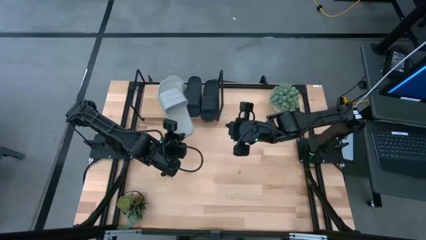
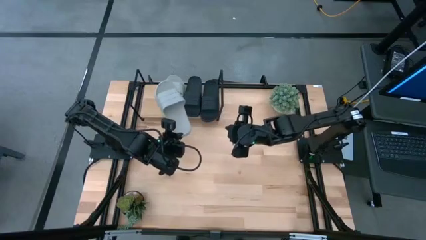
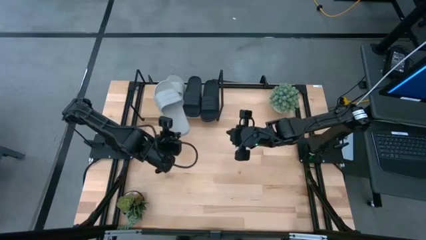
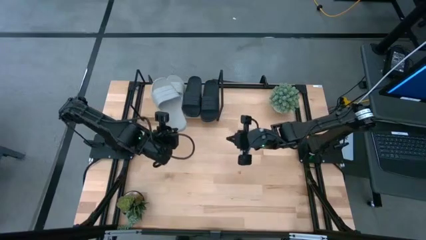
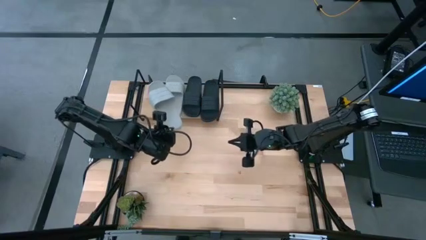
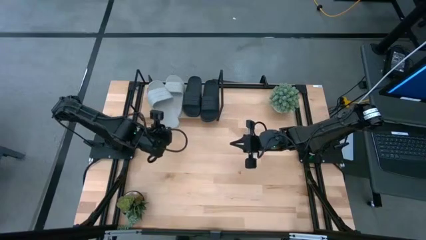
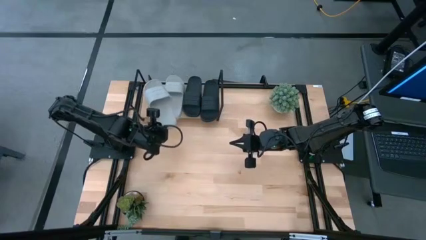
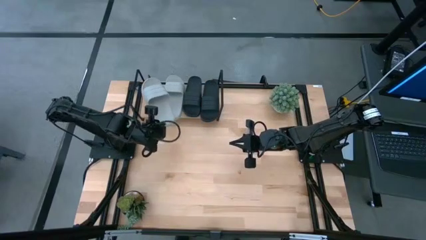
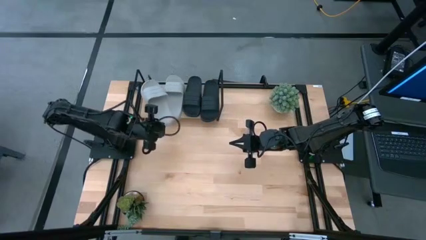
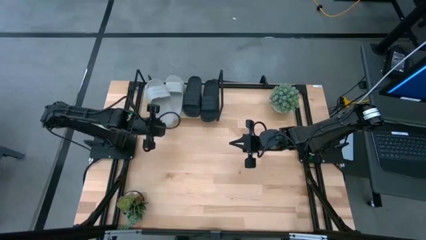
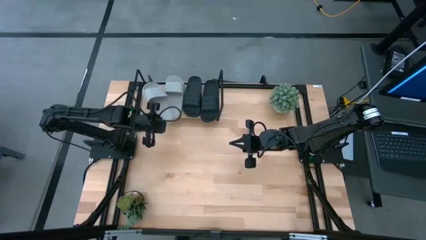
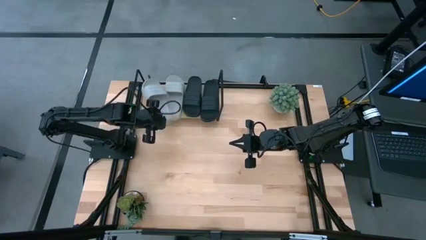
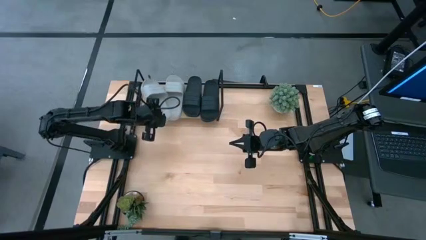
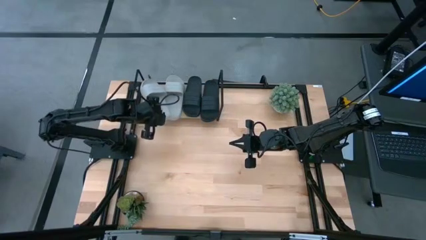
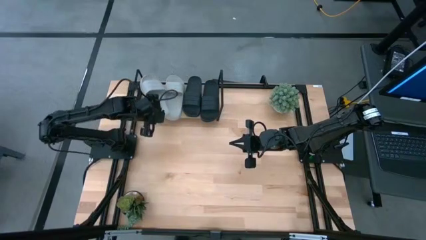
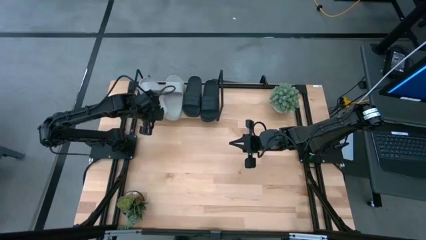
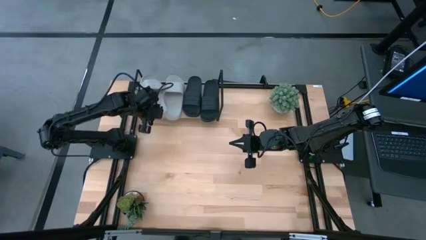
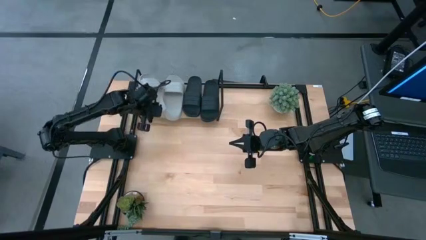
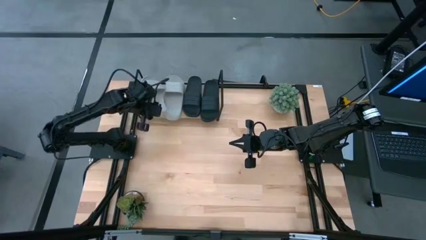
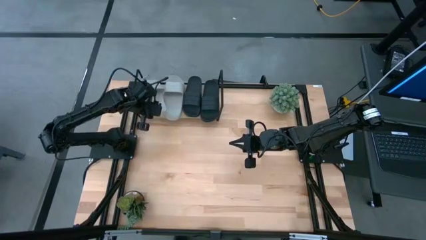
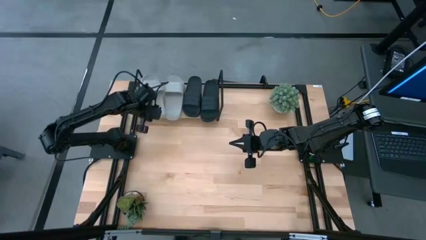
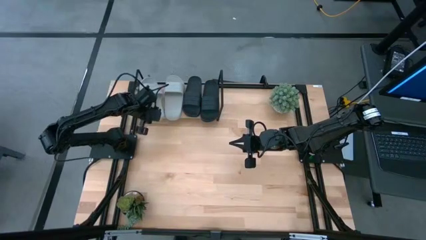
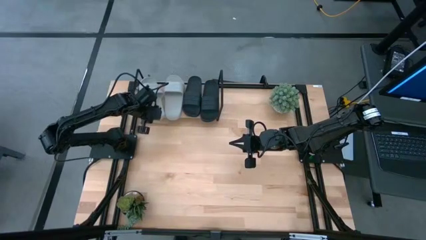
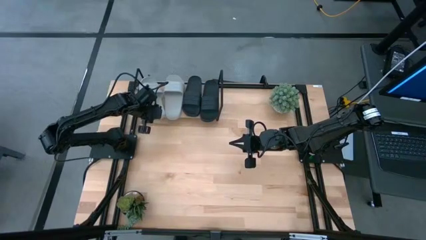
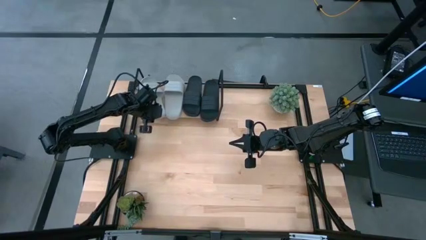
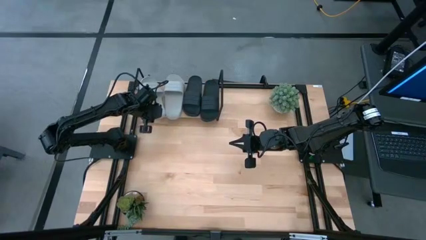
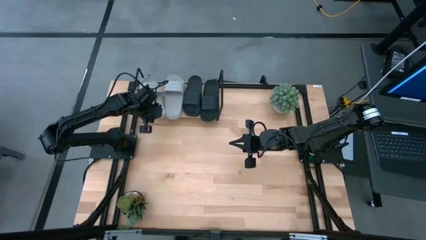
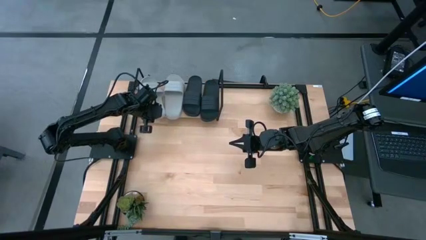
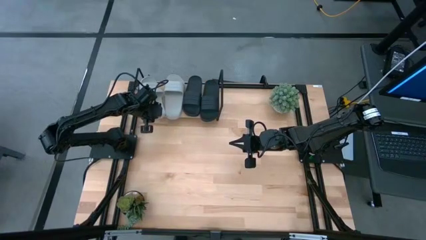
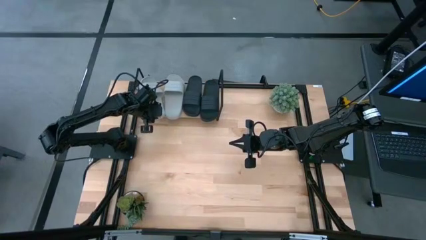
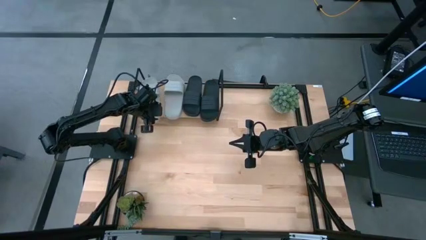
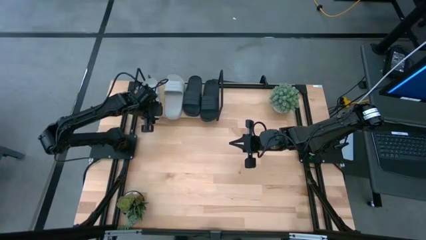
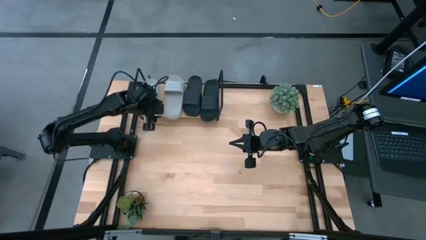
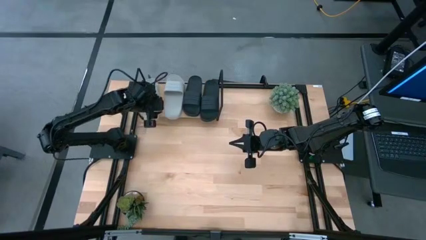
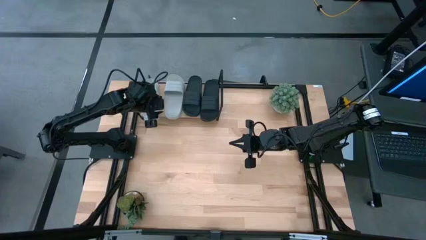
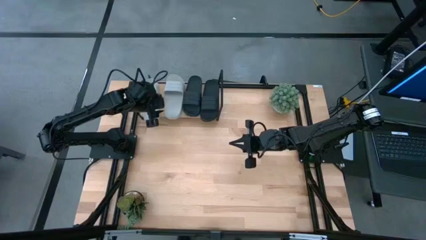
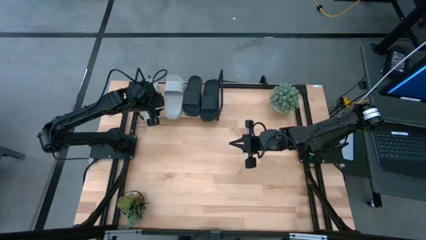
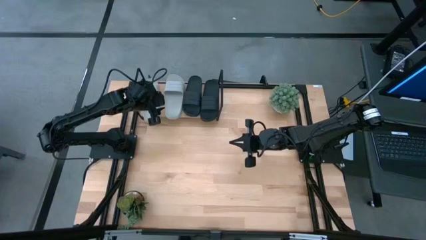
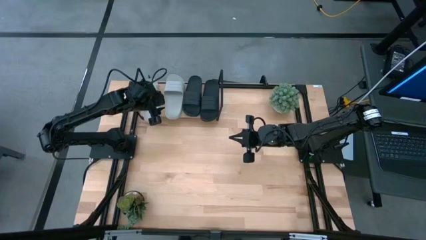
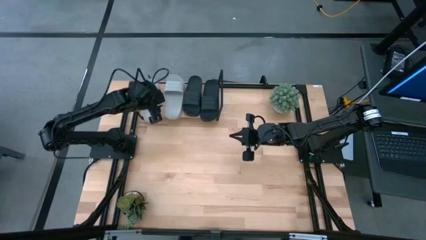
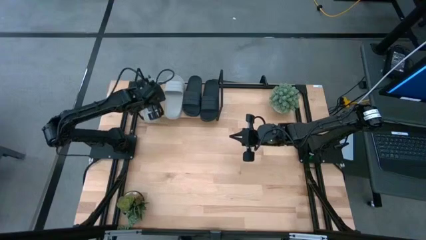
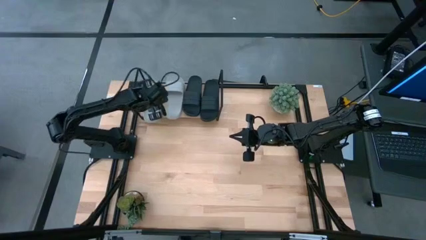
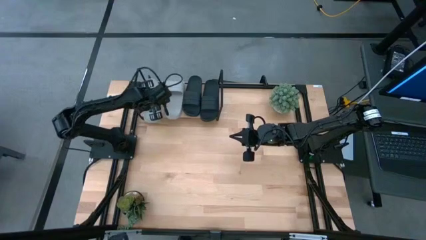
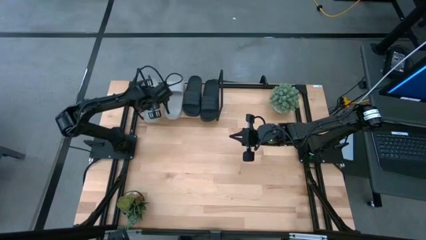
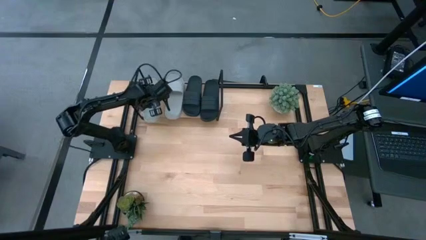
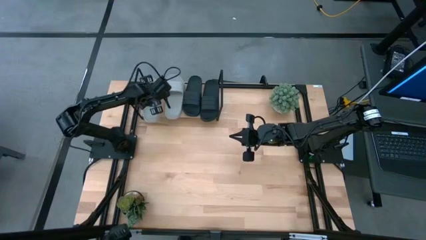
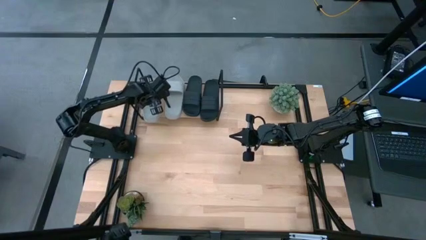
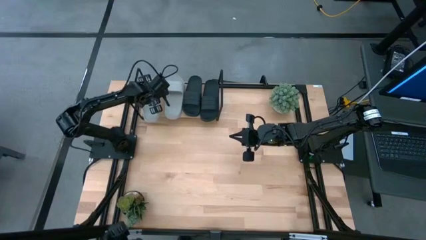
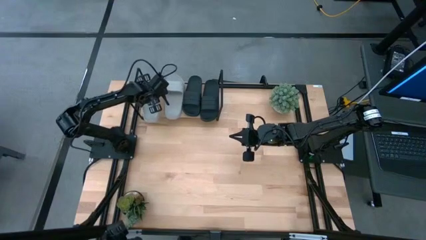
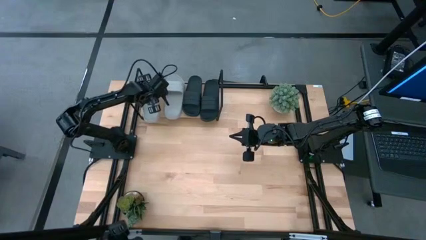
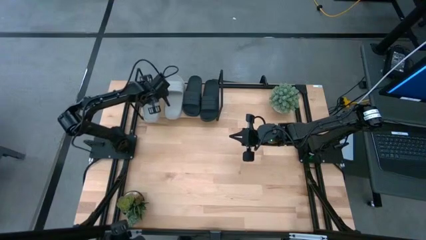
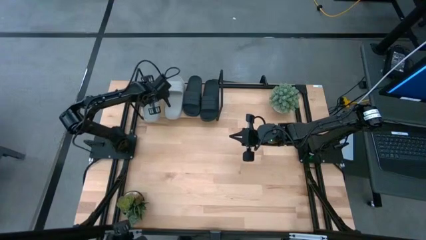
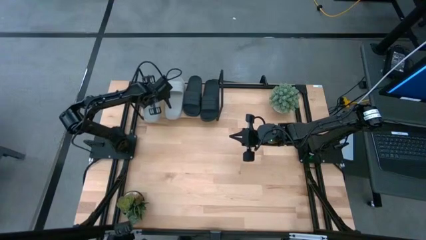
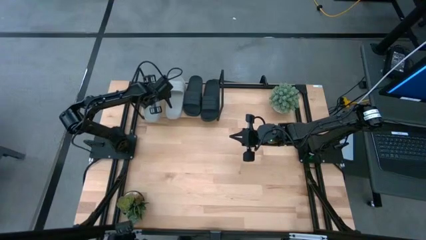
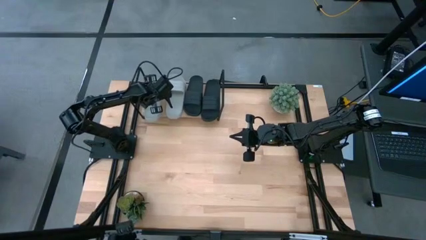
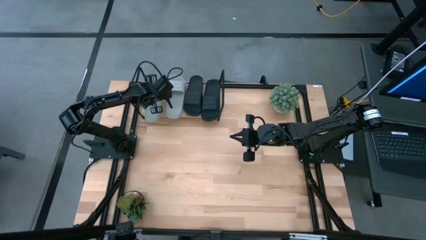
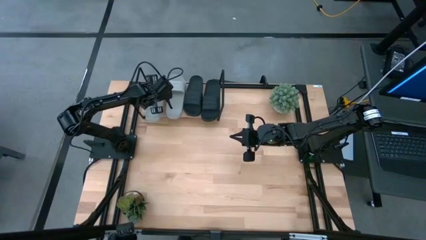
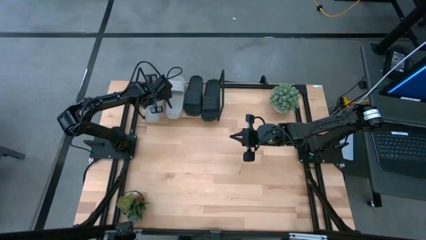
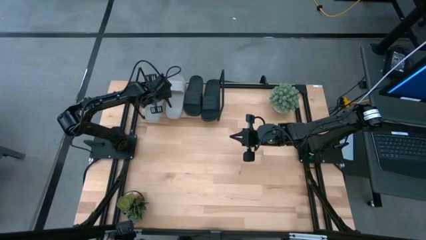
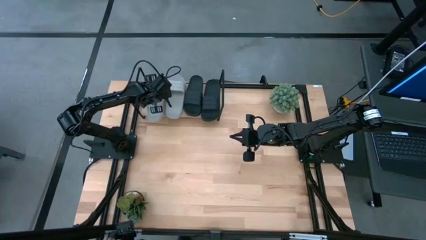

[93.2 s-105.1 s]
Task: Pick and place slides into the shelf
Put the gray slides on the shelf

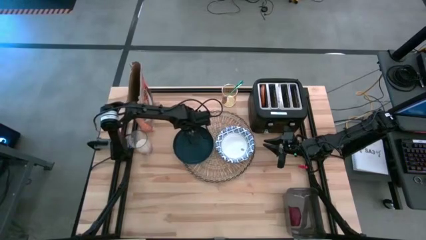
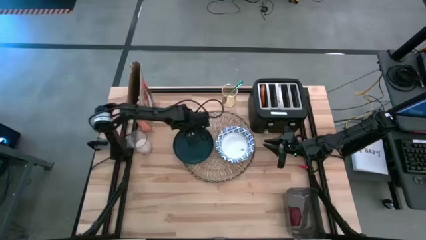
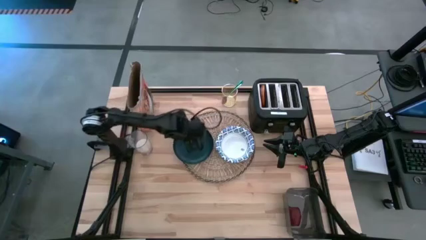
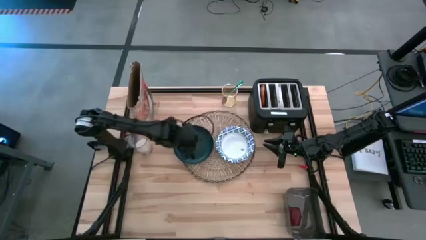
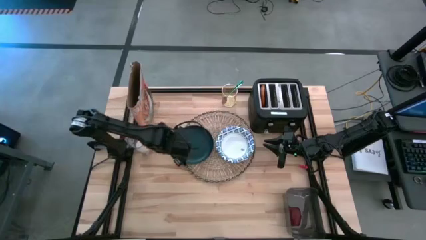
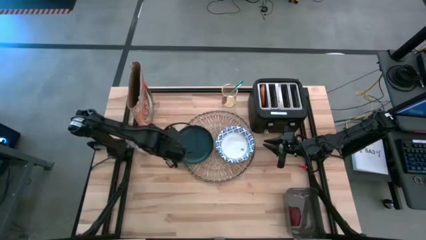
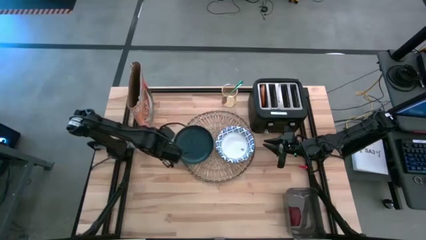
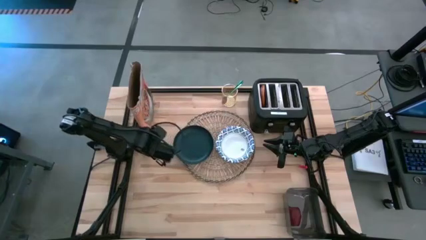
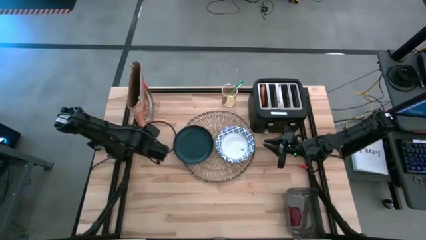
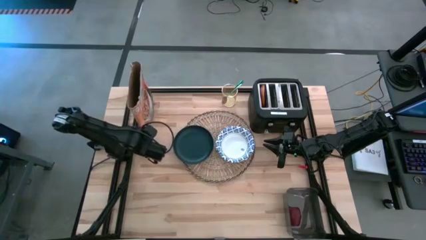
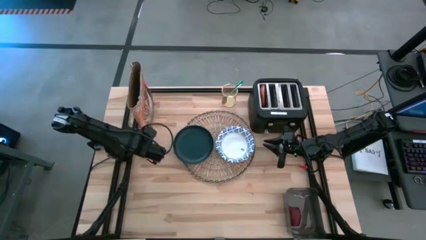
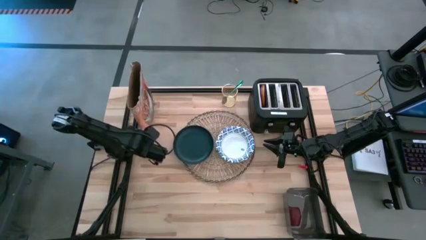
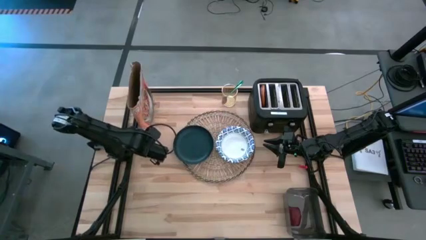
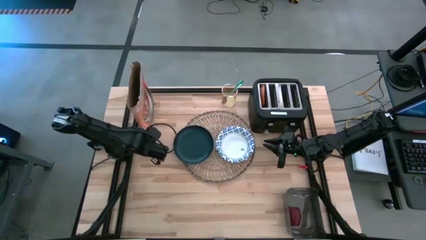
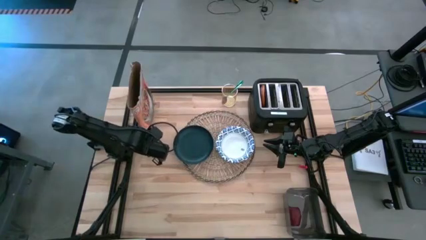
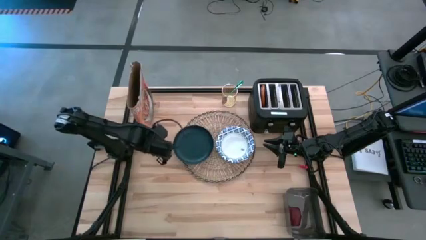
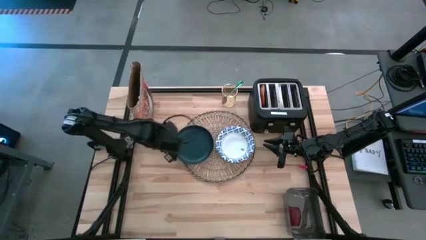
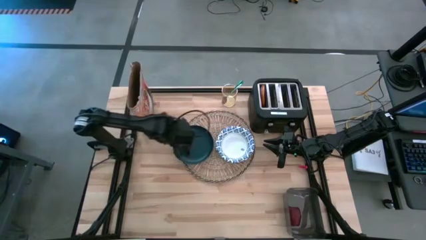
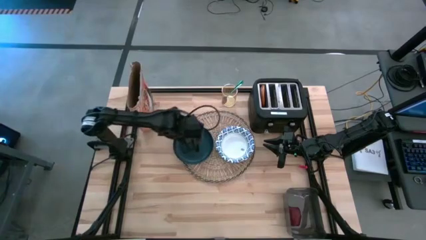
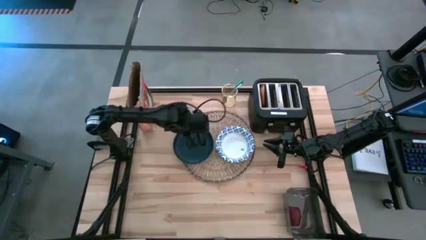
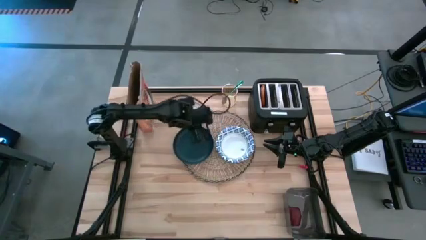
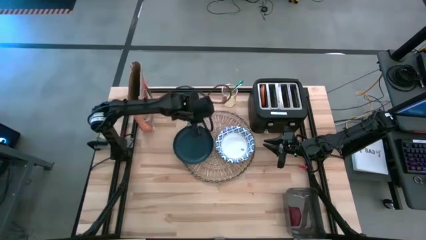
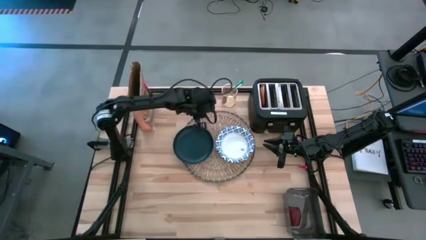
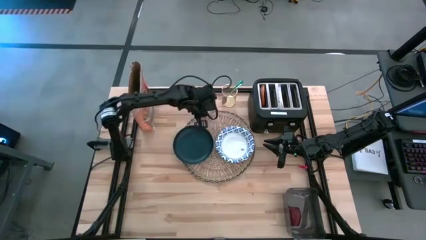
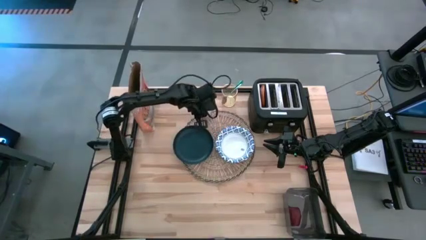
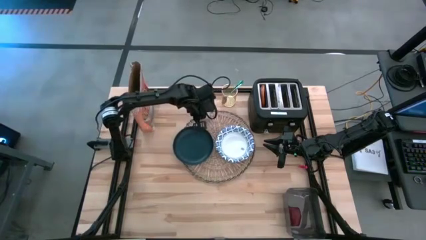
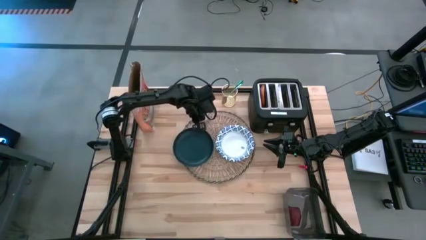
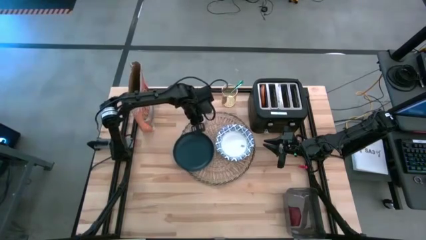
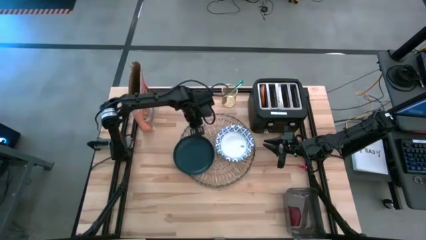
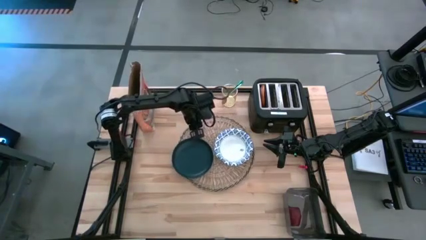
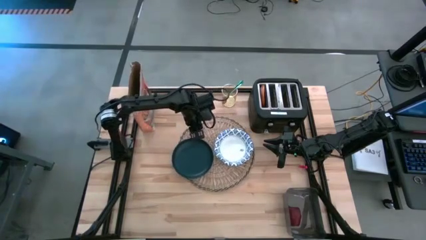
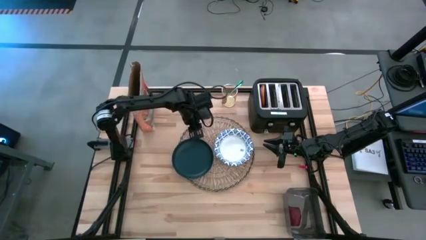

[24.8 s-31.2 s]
Task: Arrange a breakfast setting
Put the transparent cup of milk to the top of the black plate on the brown placemat
